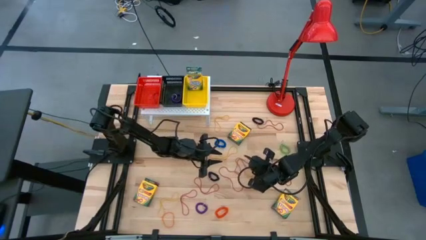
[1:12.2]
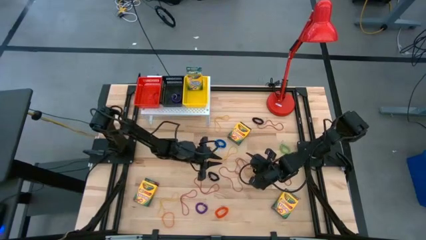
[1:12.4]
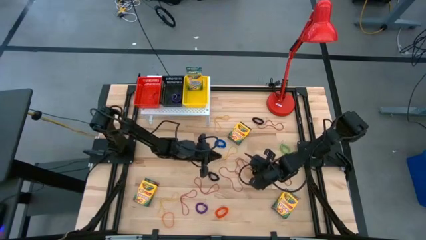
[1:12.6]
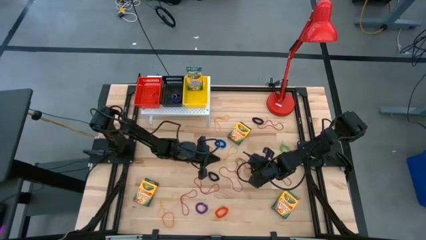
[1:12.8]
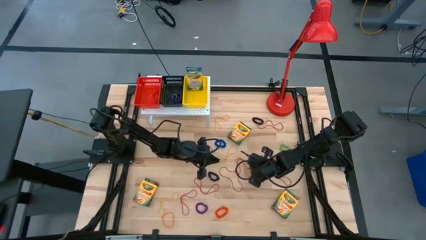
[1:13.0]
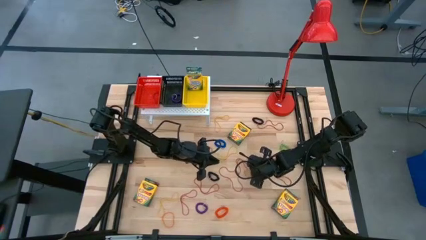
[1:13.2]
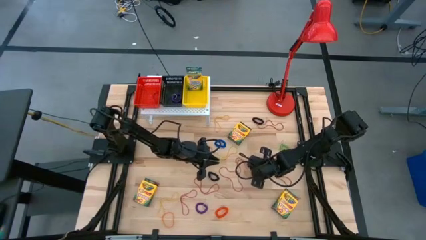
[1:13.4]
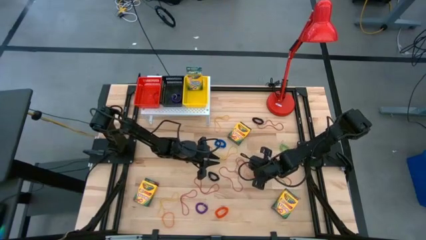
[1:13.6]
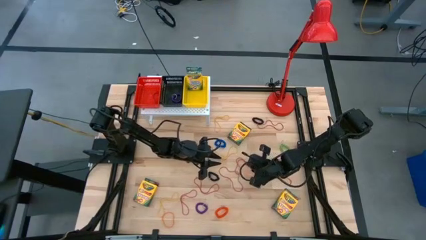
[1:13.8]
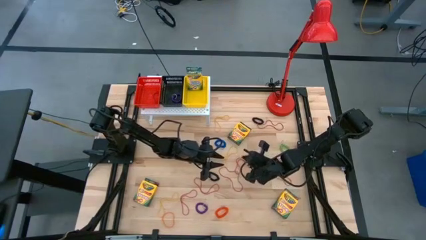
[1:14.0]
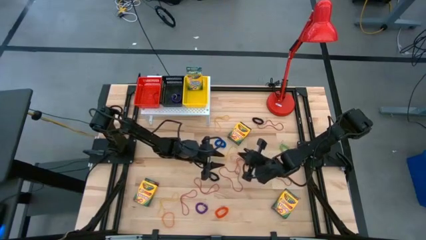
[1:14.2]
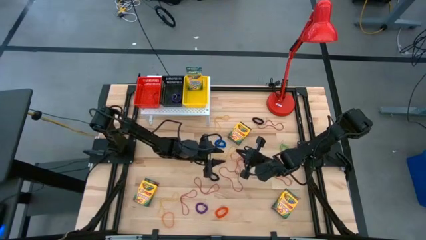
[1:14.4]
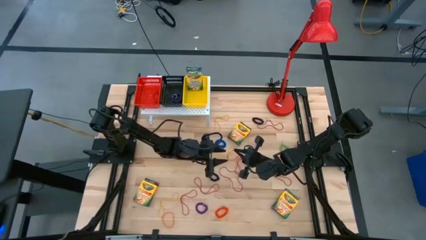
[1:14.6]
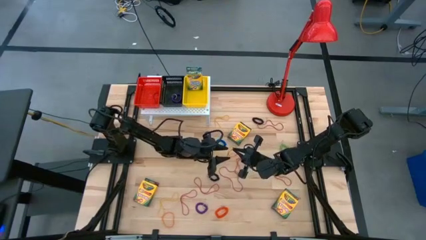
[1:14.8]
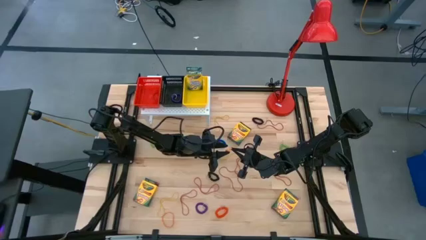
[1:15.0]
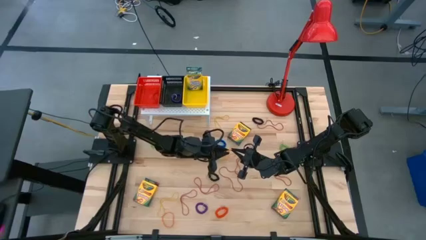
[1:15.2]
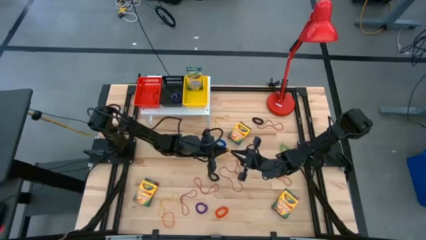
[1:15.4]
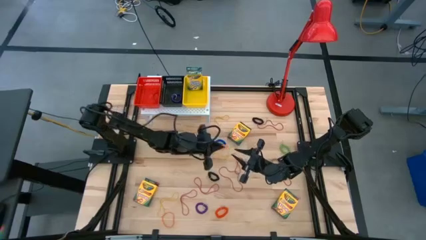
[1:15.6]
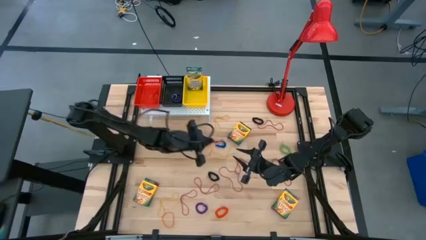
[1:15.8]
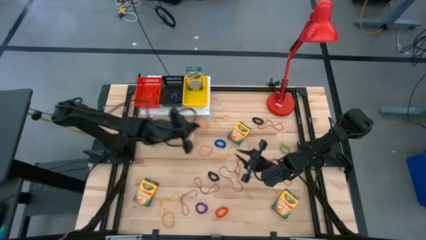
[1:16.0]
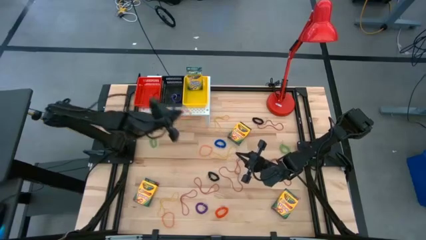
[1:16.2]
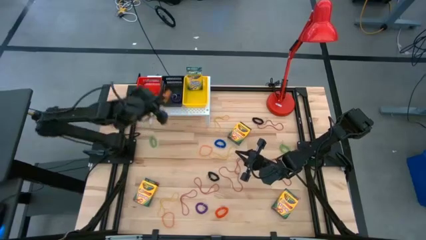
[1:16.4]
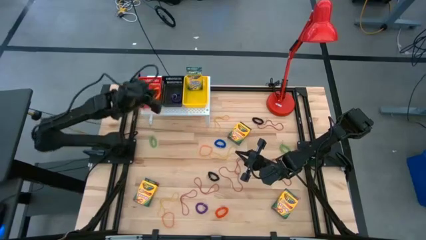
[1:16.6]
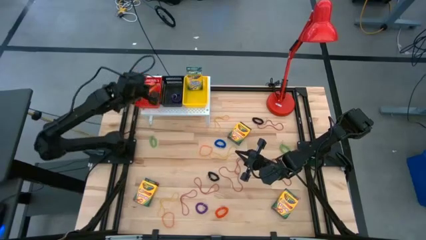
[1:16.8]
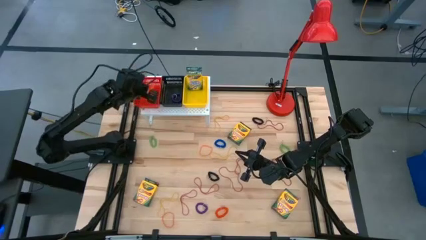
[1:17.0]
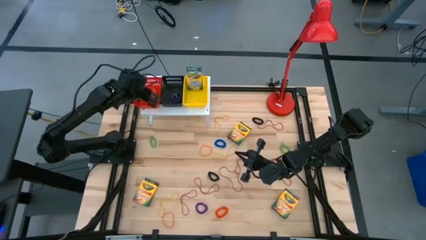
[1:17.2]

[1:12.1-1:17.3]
Task: Pick & Place Office Desk Supplies
Put the orange rubber band into the red bin on the shelf

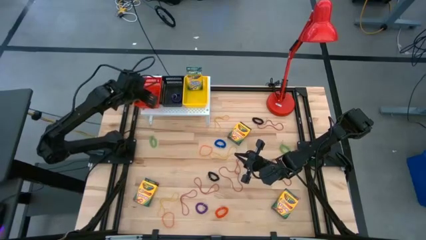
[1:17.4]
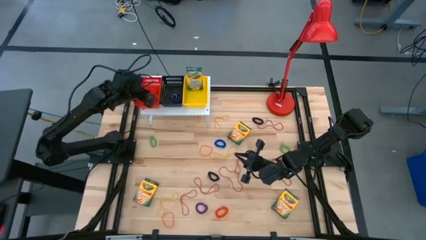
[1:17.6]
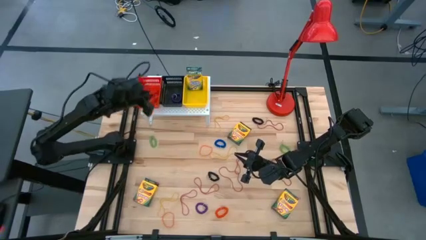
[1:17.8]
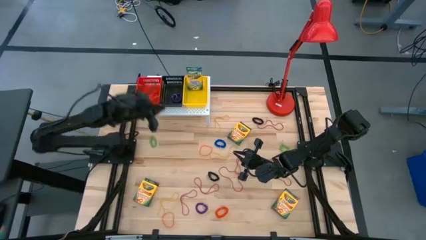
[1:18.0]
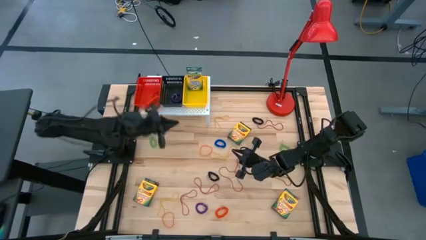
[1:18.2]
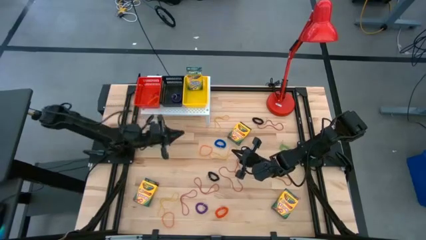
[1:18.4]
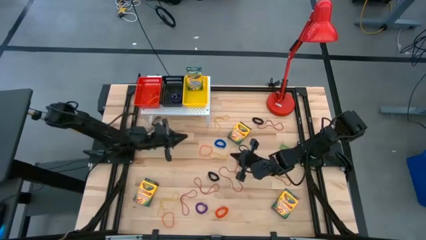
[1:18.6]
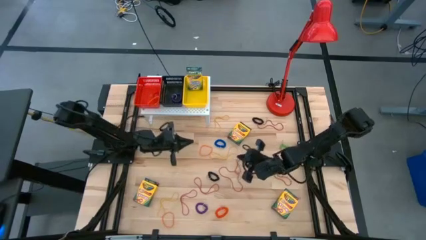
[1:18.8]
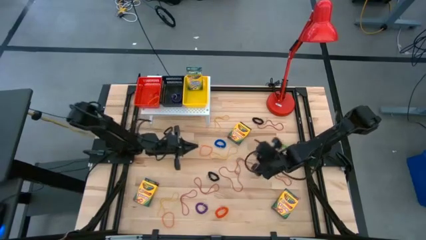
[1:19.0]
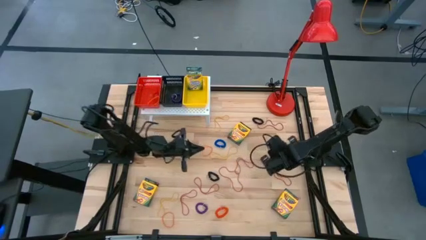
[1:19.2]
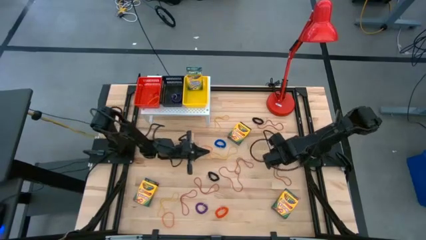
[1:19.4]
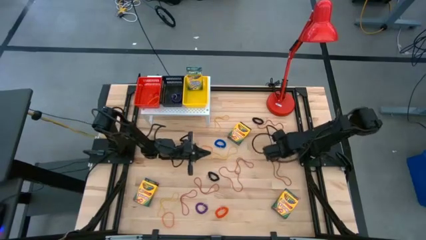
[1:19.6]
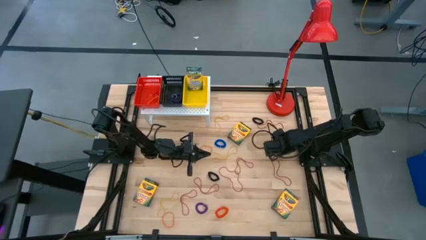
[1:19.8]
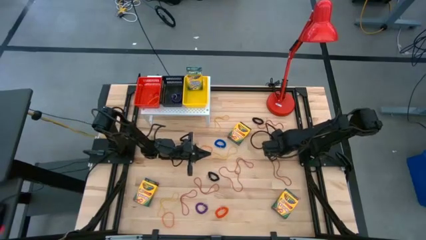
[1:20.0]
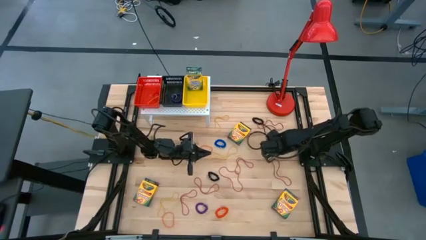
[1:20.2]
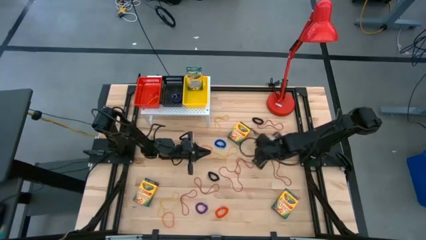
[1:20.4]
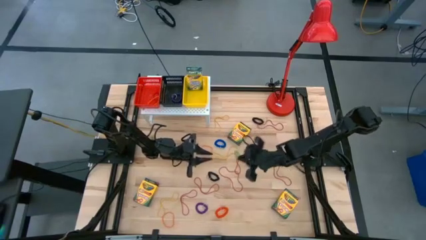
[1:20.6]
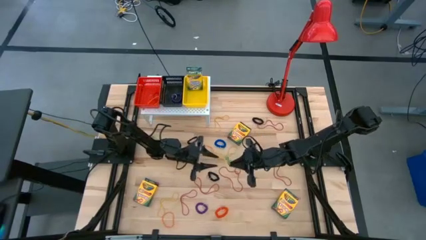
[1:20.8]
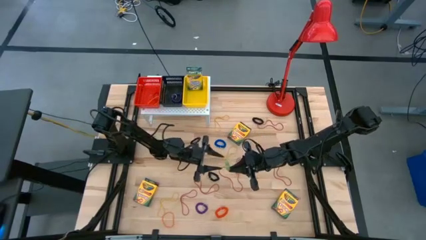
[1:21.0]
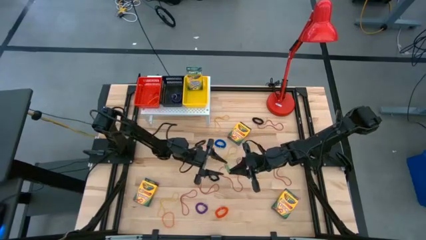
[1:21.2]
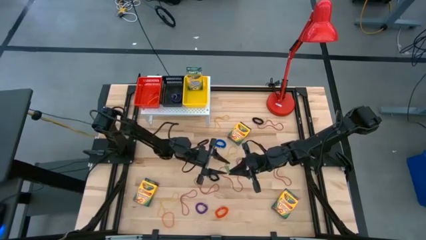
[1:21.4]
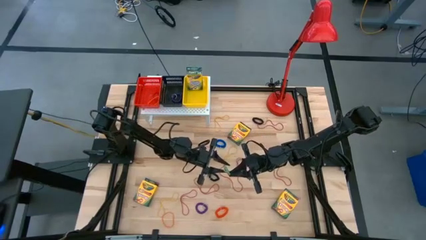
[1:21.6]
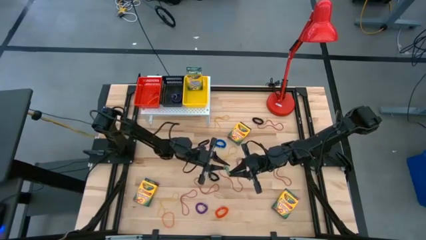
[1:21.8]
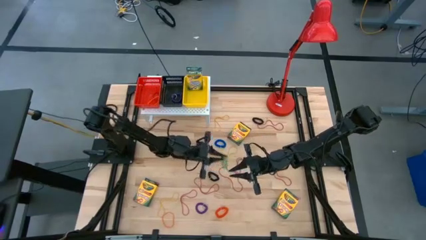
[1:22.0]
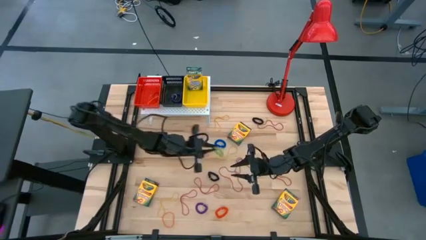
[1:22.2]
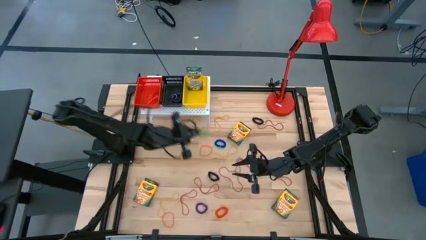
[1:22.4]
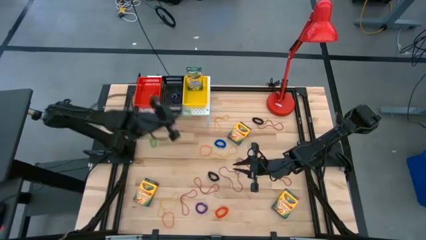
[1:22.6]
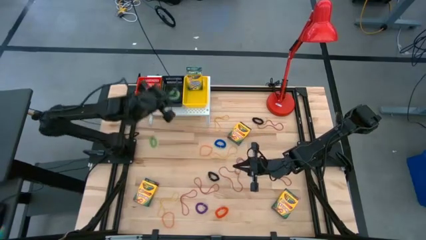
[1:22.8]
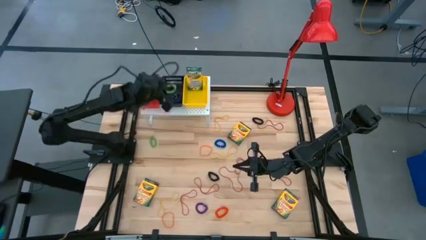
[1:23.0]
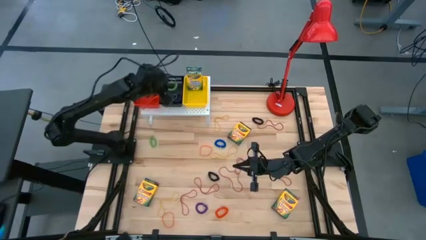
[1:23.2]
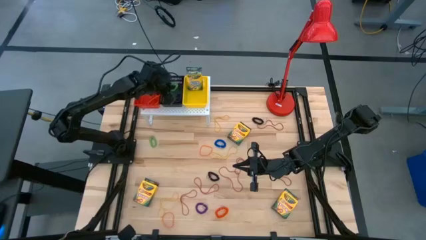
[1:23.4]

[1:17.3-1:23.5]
Put the green spring keychain into the black bin on the shelf

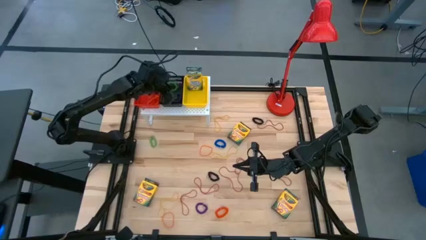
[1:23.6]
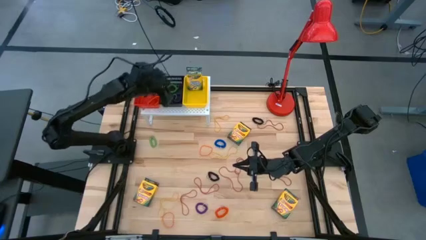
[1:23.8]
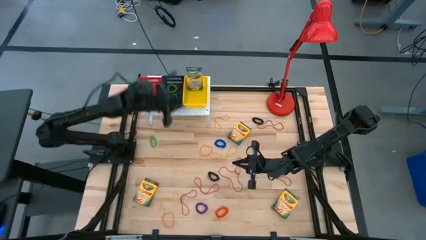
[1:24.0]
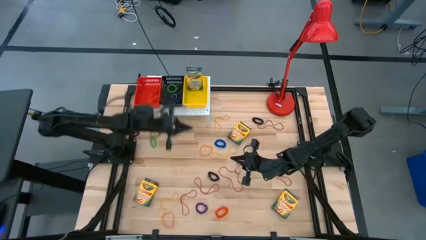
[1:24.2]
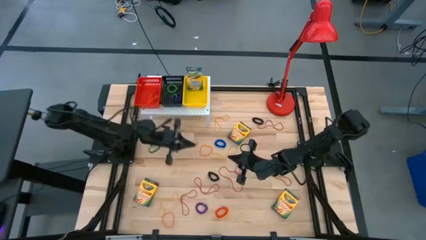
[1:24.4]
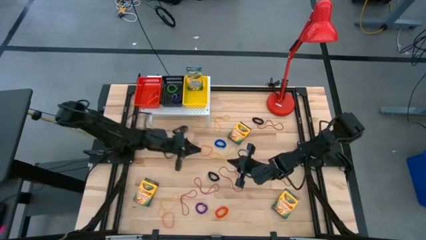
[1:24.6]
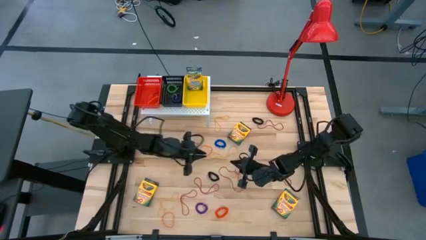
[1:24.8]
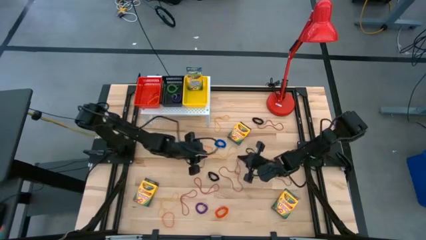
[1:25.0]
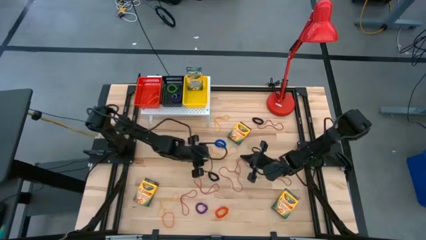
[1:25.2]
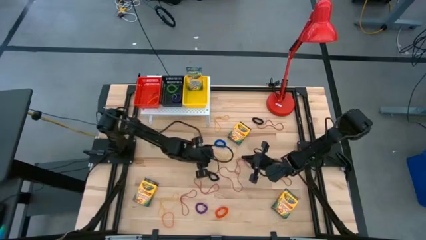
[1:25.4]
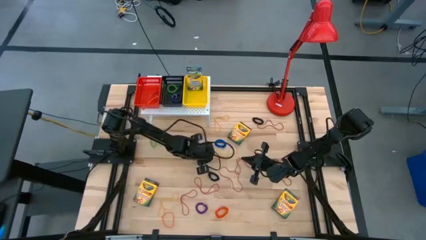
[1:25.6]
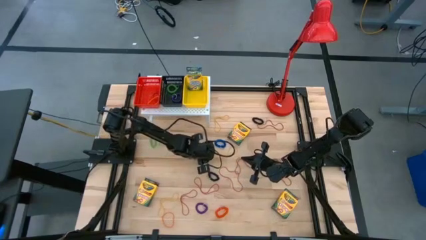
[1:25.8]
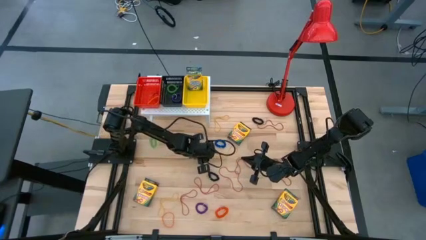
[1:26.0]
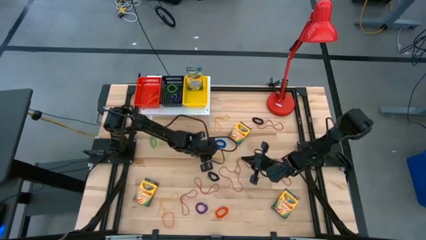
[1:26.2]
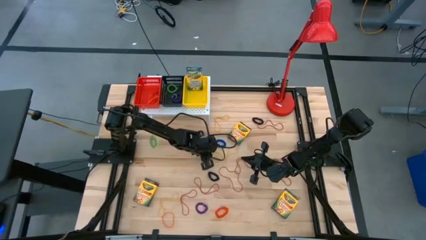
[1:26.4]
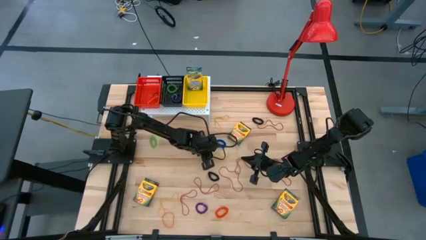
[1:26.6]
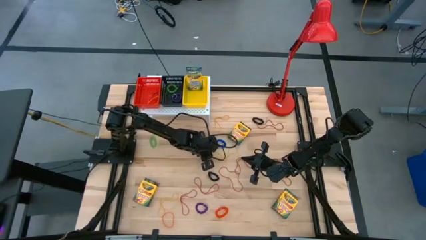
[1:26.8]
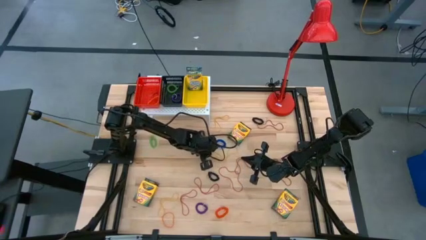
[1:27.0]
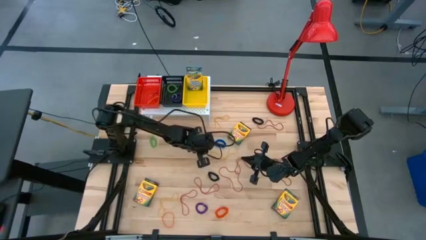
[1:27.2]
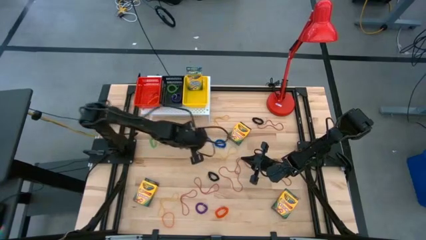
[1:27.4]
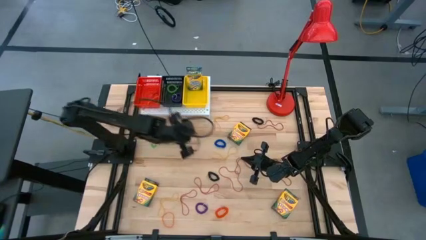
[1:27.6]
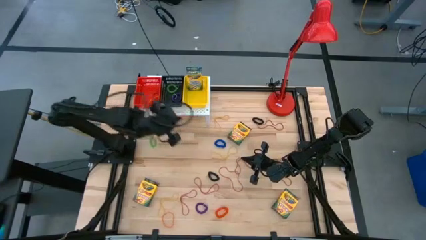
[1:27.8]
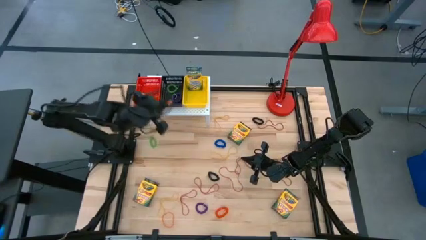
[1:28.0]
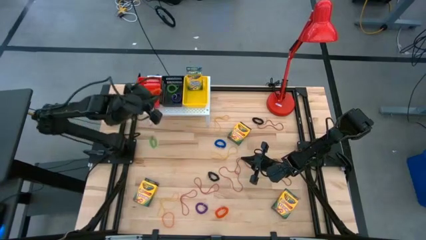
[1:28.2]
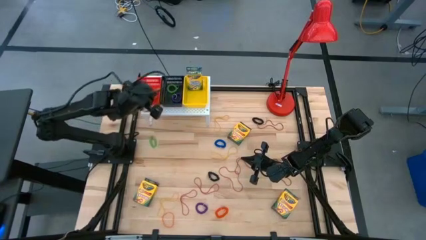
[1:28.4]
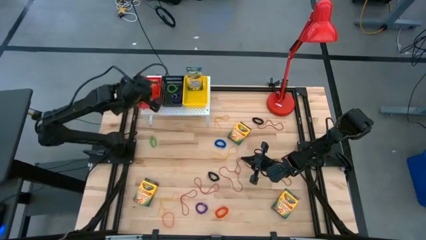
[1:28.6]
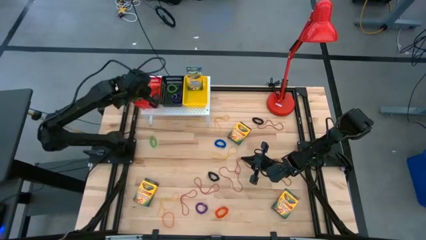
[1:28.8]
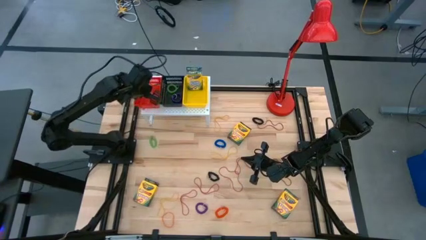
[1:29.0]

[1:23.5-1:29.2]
Put the orange rubber band into the red bin on the shelf

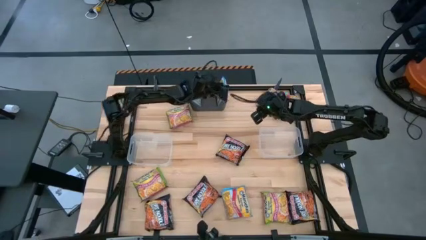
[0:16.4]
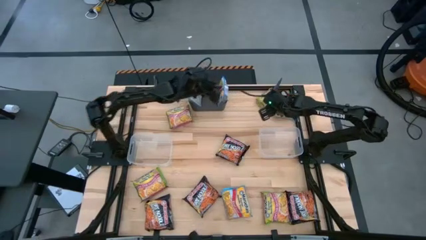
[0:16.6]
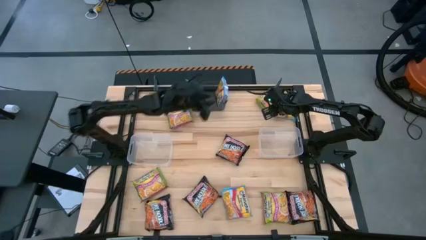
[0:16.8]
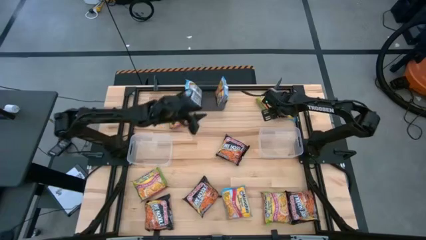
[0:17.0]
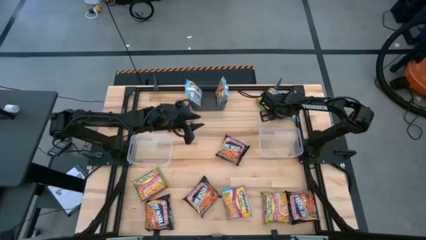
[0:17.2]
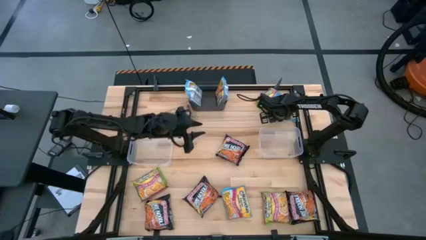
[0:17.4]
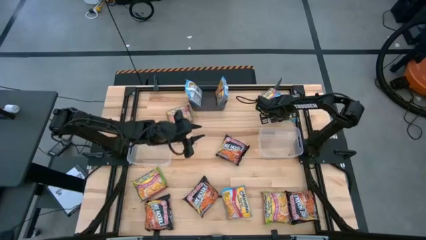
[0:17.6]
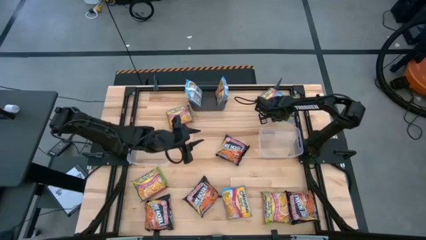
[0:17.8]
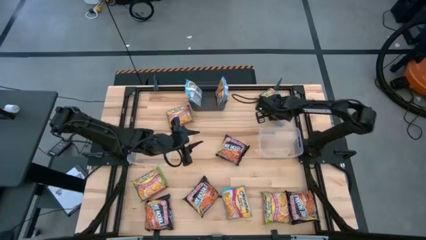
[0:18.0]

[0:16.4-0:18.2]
Task: Sort Maruchan noodles
Put the blue noodle pack into the black bin
